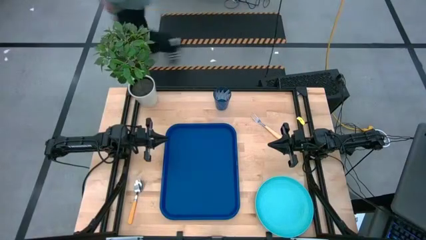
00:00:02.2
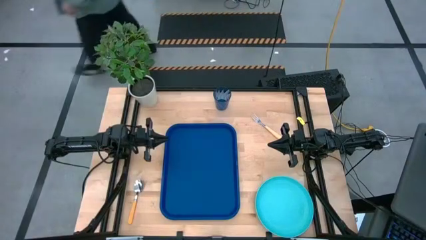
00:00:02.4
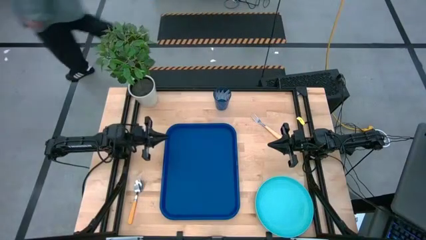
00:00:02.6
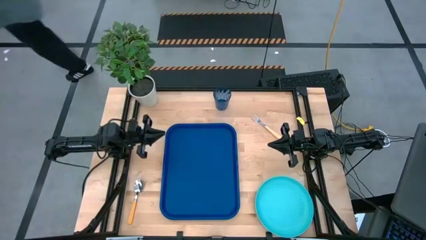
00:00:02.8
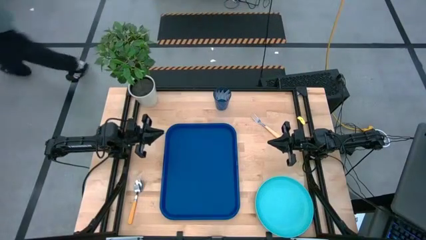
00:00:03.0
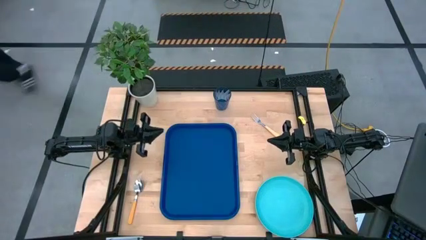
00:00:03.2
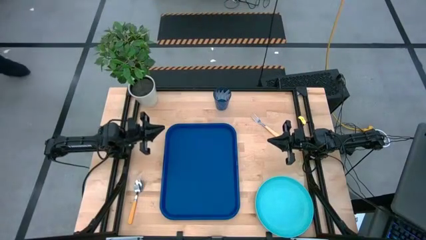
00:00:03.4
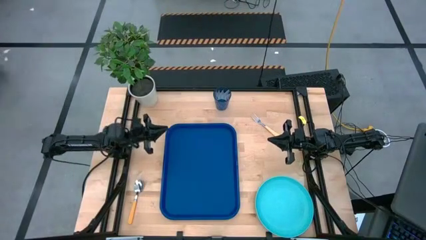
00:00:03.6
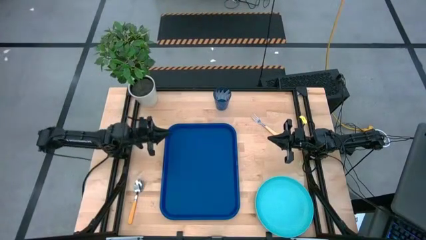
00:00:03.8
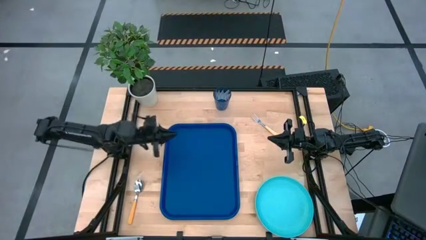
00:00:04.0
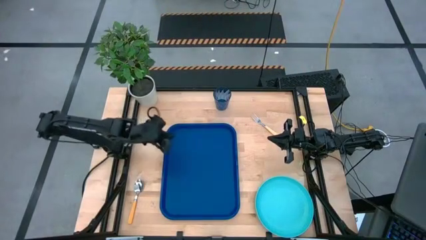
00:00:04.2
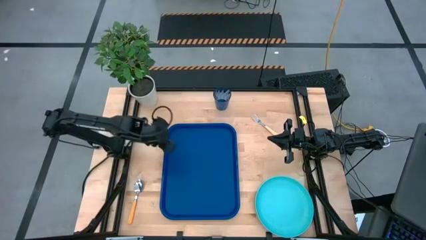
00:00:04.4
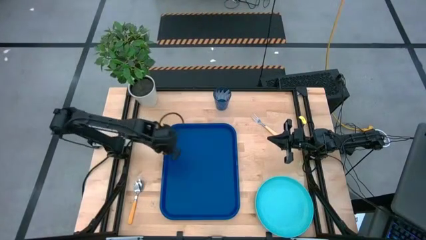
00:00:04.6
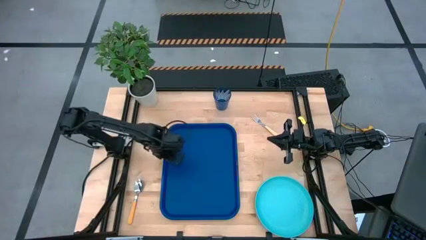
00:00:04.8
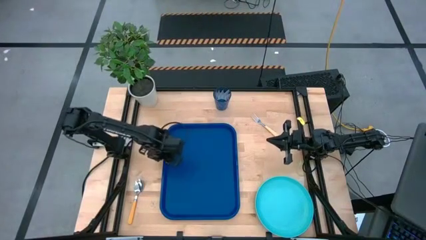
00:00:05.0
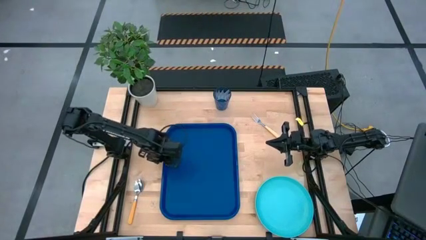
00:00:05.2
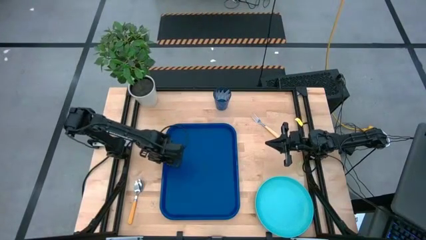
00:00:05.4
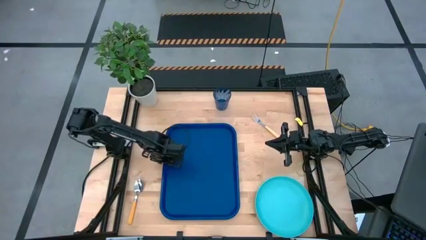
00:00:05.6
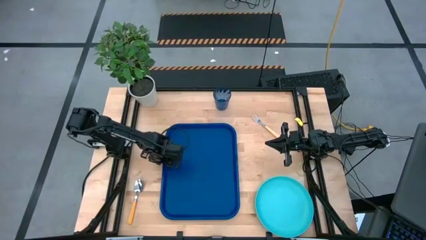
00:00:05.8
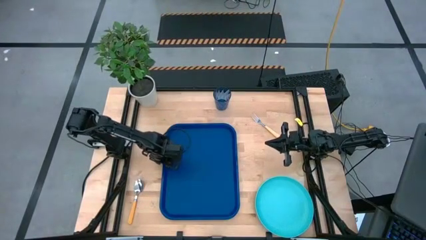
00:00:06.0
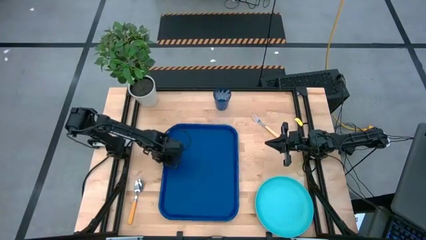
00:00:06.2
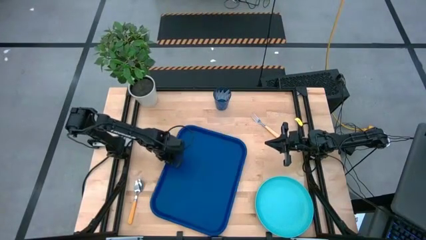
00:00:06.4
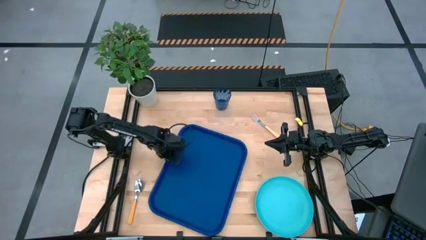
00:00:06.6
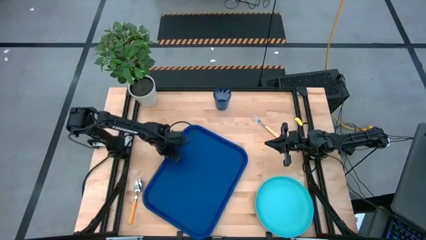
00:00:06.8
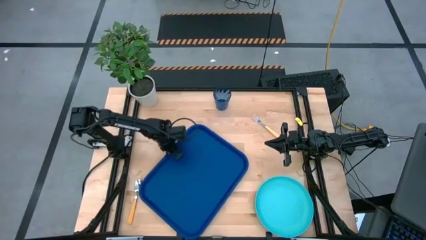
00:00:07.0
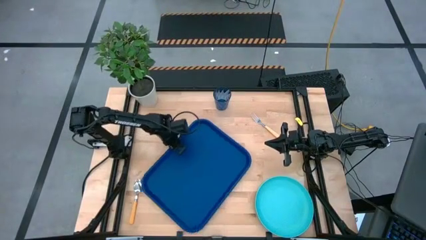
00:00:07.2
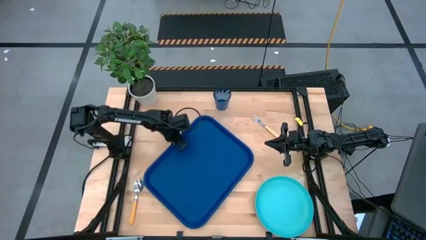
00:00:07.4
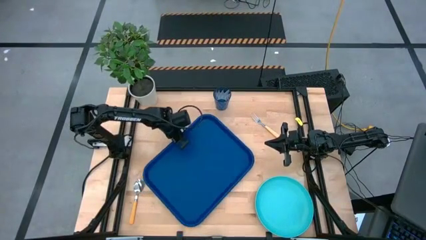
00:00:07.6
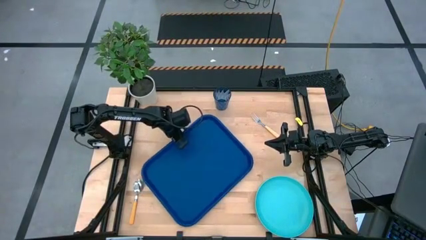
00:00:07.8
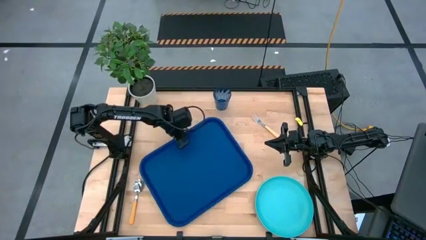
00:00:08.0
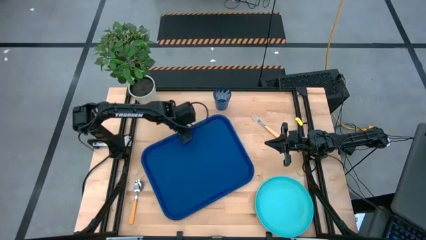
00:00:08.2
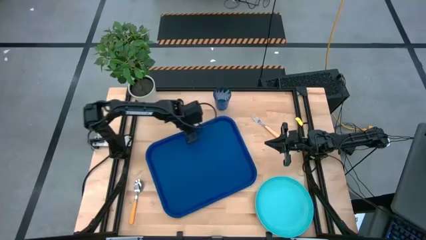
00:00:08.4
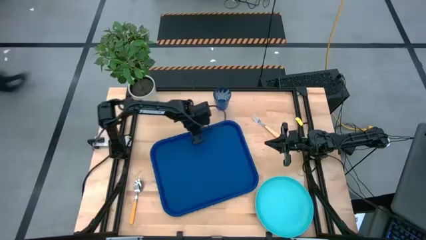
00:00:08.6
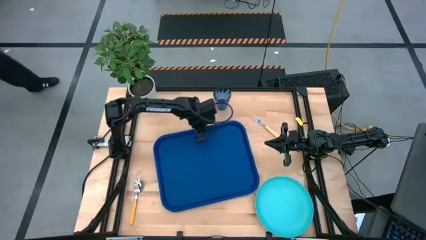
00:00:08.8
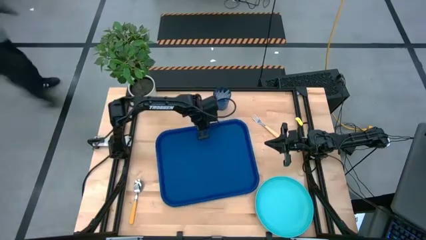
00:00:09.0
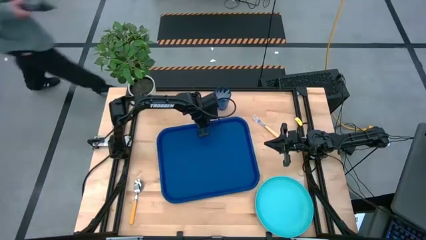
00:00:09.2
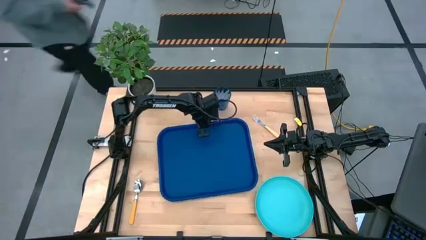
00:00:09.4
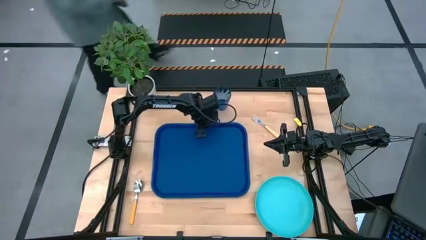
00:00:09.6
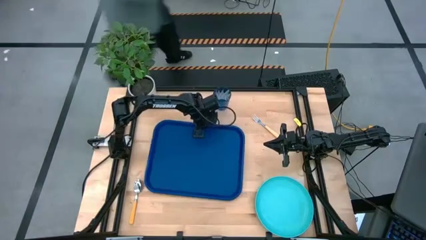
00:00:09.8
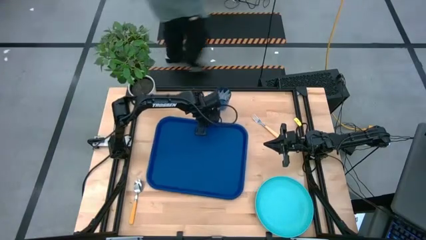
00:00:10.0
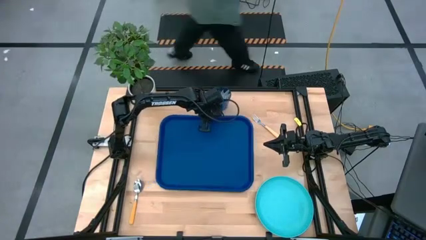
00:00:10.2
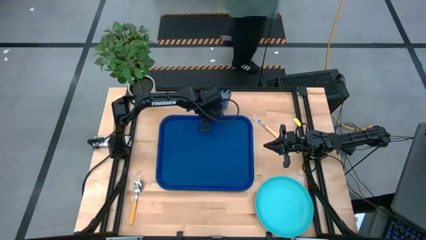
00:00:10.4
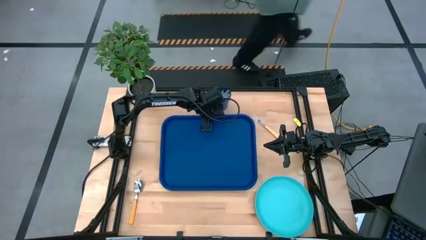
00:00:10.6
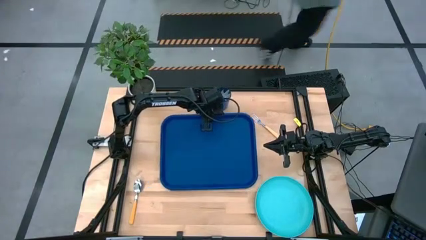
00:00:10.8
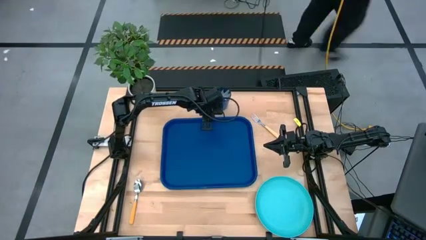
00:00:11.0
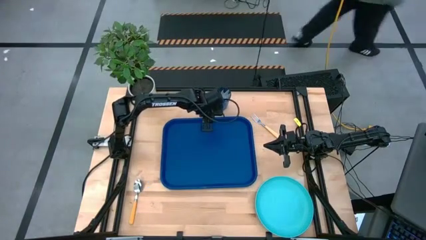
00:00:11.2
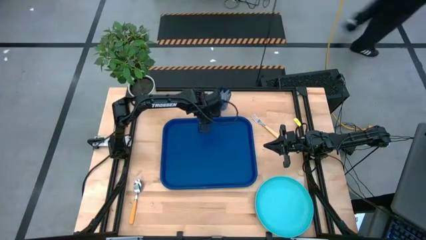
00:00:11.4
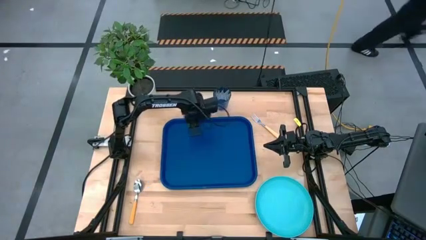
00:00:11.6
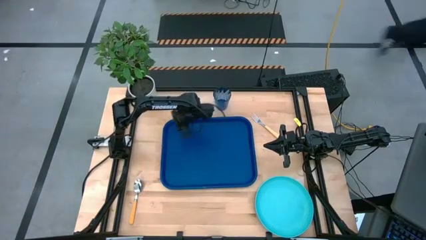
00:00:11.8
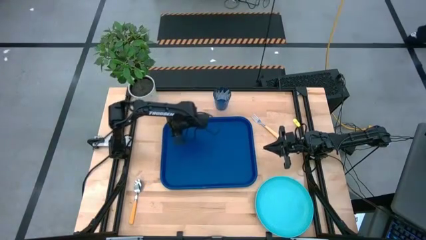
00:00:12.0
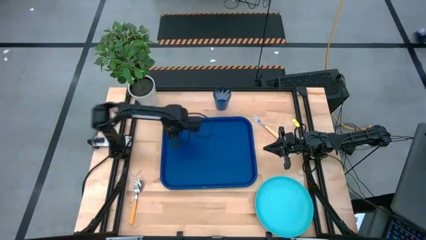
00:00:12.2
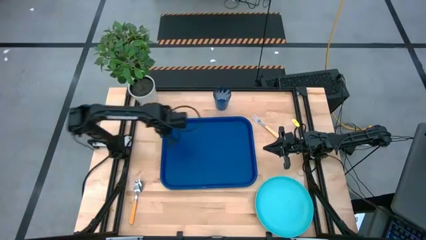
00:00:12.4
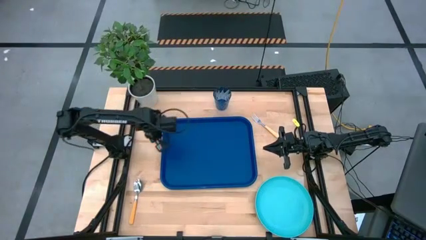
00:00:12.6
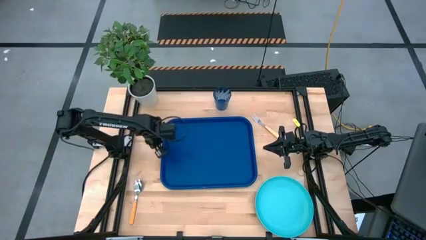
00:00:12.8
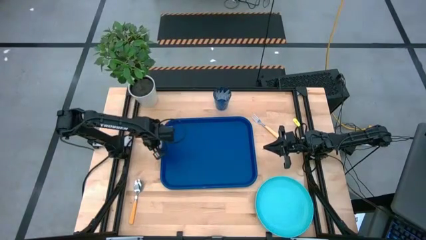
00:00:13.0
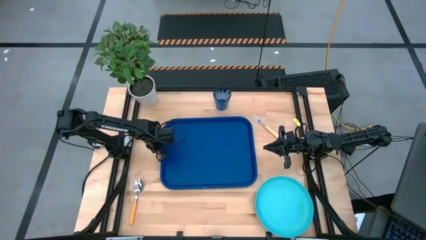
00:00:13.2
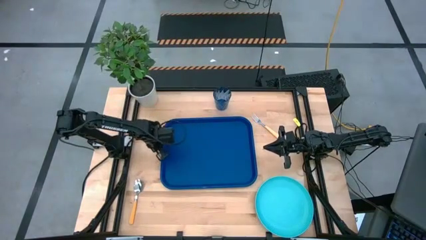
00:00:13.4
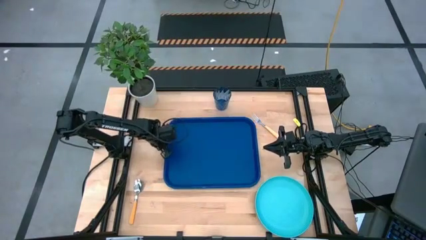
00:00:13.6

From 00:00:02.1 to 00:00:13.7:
Task: Pick and place plate/cup/fork/spoon on tray
Prepare the blue serving tray
